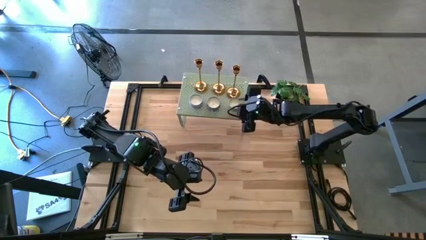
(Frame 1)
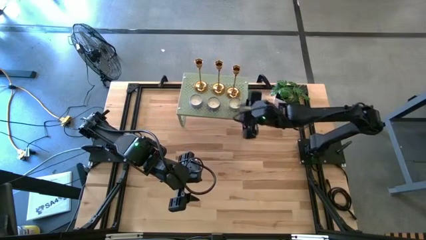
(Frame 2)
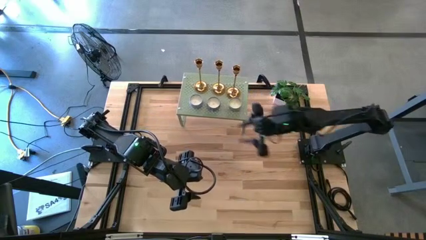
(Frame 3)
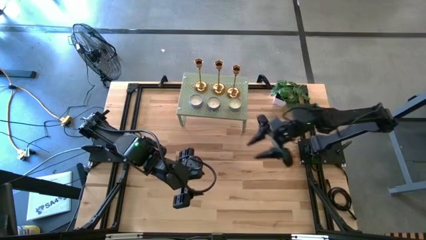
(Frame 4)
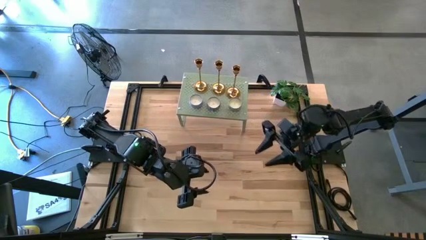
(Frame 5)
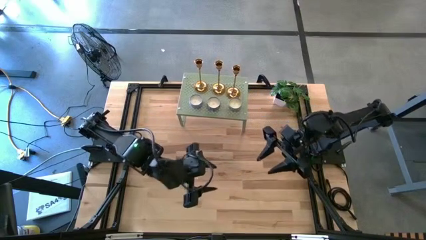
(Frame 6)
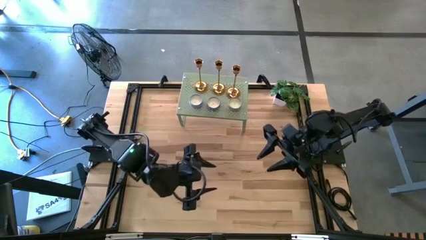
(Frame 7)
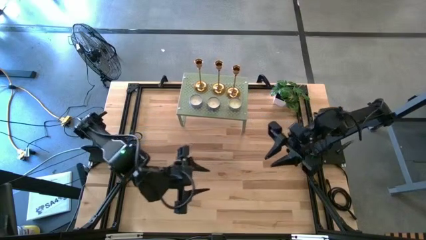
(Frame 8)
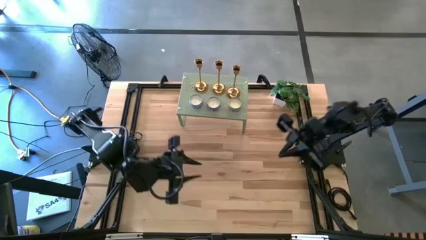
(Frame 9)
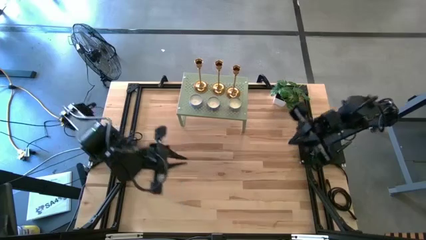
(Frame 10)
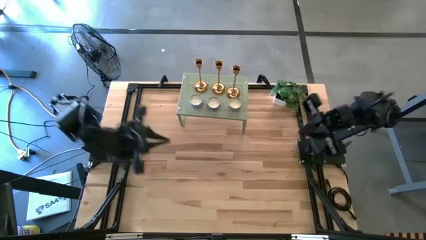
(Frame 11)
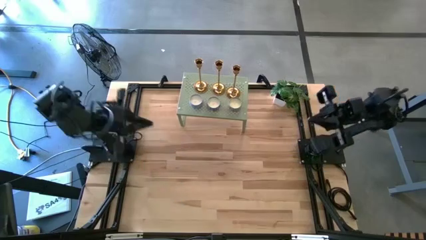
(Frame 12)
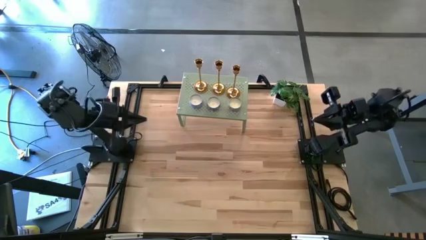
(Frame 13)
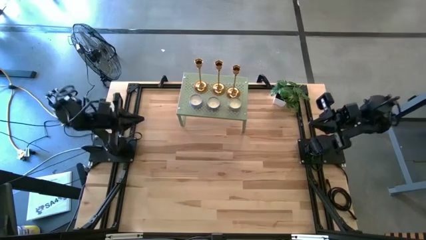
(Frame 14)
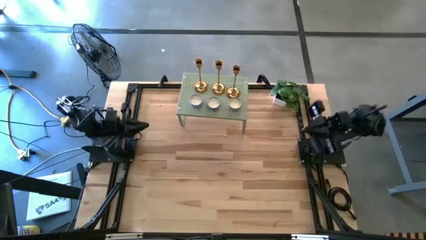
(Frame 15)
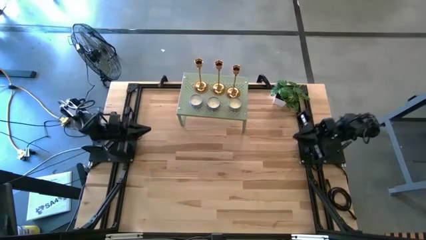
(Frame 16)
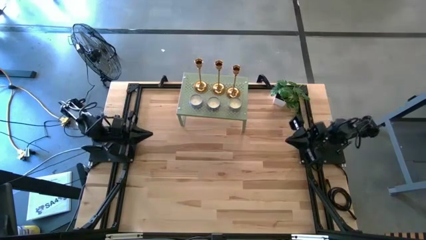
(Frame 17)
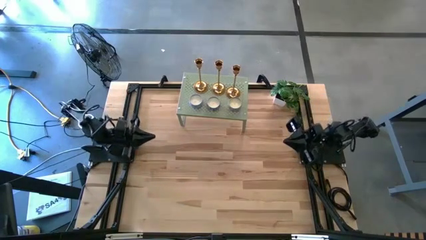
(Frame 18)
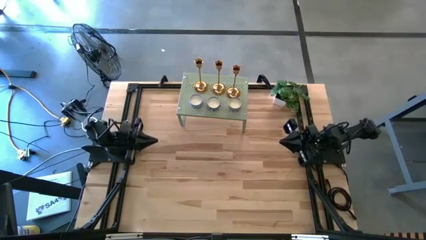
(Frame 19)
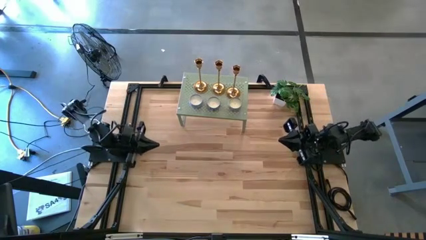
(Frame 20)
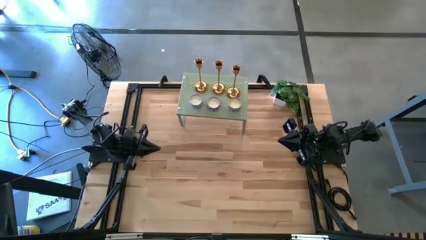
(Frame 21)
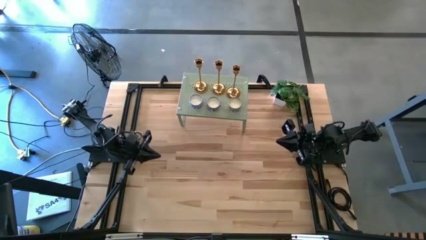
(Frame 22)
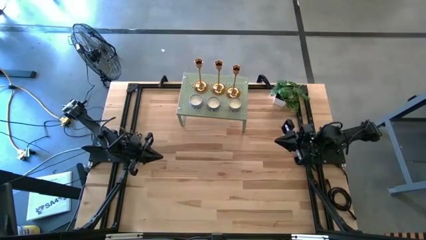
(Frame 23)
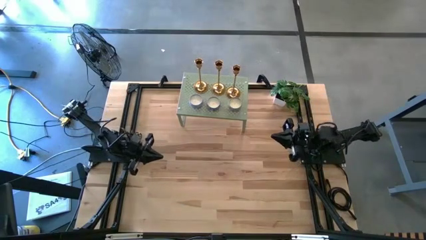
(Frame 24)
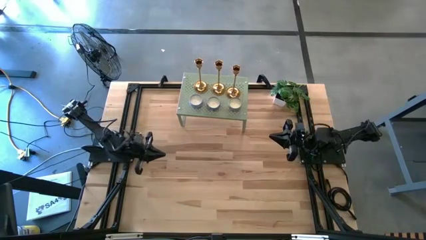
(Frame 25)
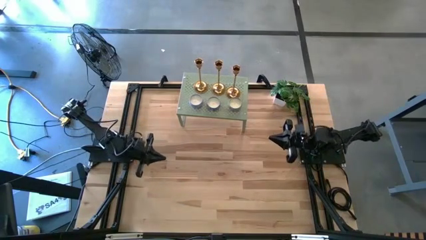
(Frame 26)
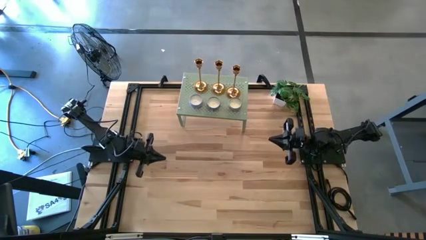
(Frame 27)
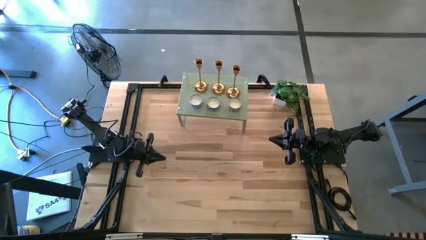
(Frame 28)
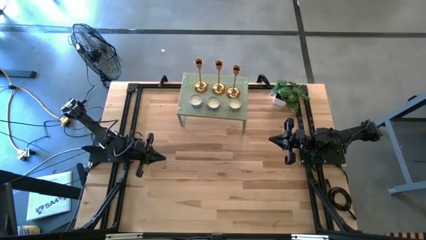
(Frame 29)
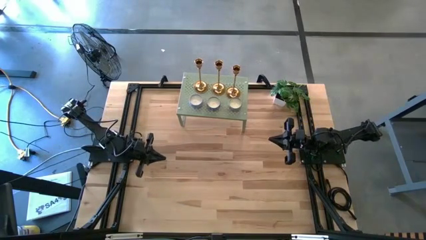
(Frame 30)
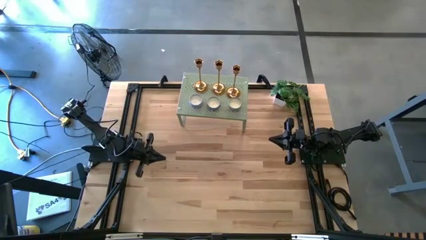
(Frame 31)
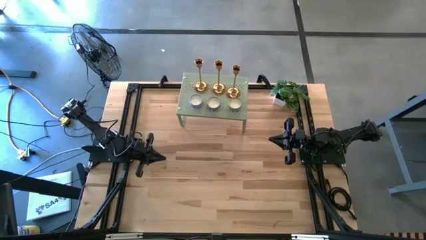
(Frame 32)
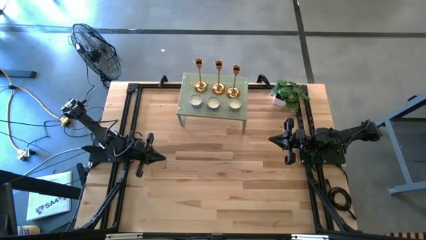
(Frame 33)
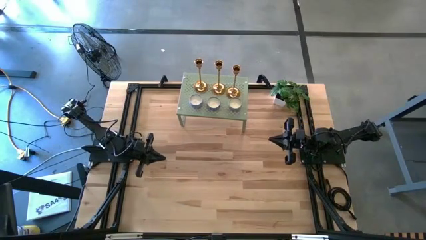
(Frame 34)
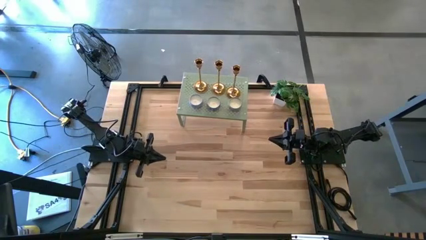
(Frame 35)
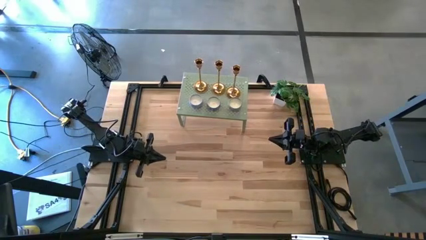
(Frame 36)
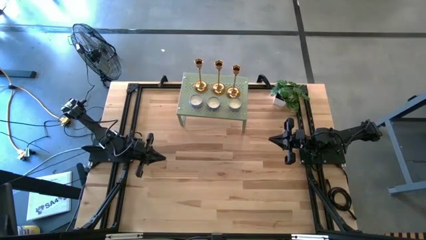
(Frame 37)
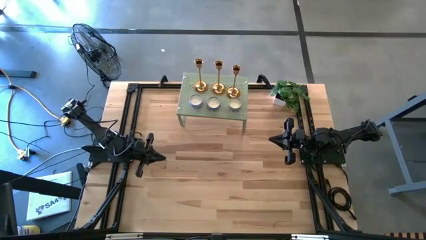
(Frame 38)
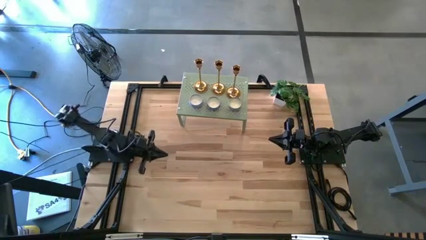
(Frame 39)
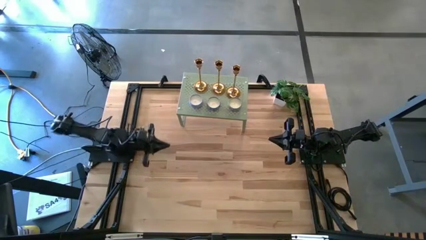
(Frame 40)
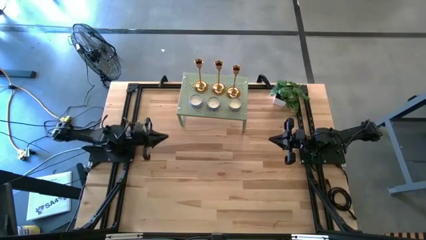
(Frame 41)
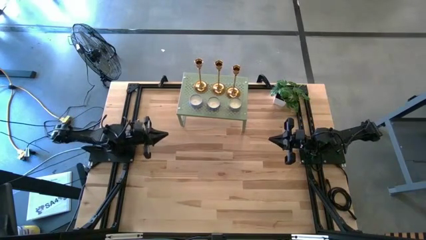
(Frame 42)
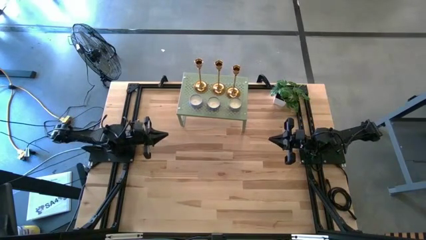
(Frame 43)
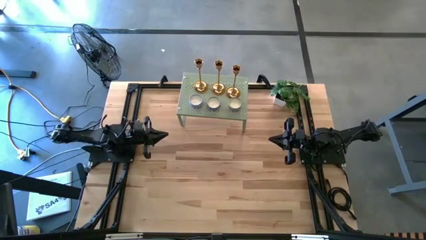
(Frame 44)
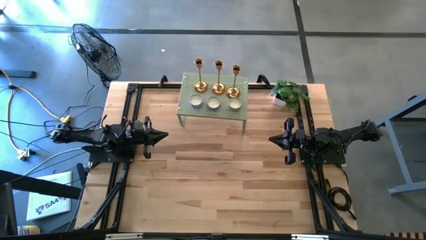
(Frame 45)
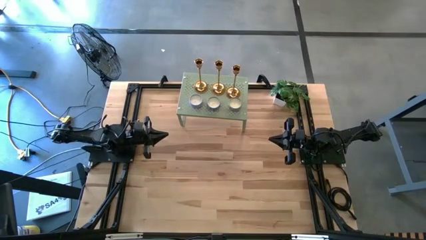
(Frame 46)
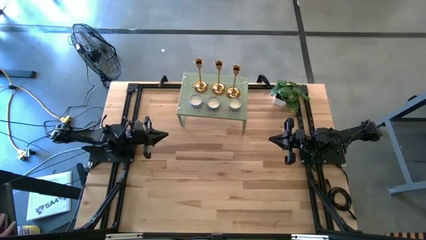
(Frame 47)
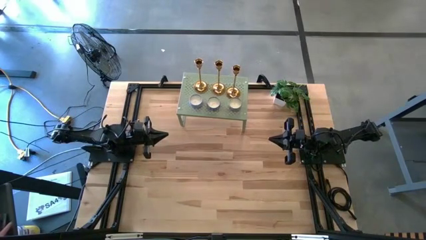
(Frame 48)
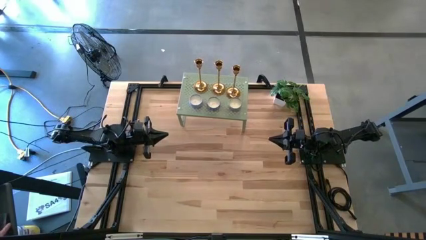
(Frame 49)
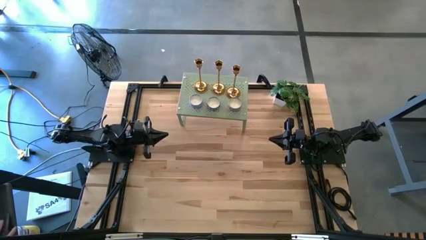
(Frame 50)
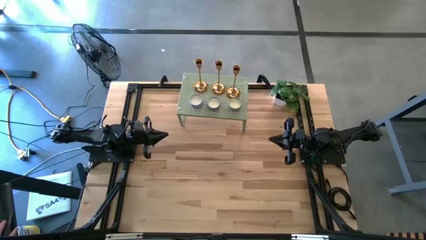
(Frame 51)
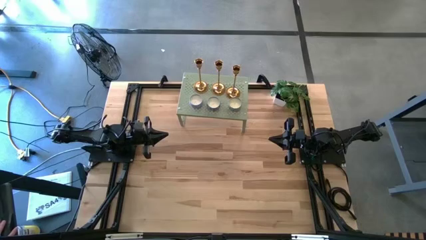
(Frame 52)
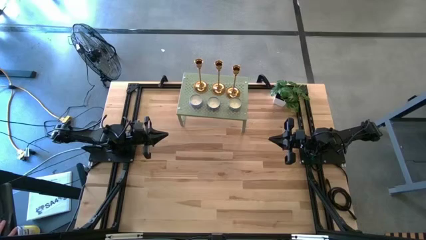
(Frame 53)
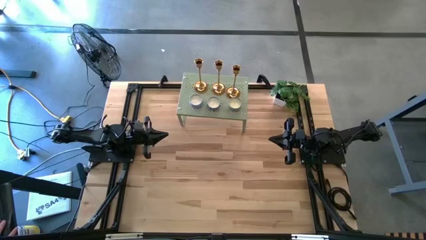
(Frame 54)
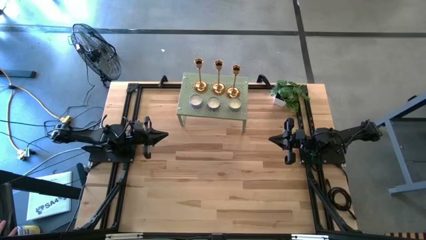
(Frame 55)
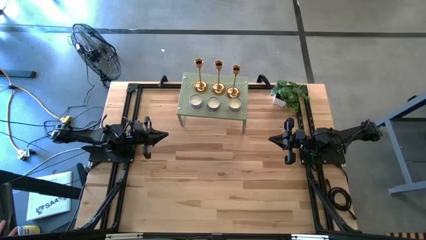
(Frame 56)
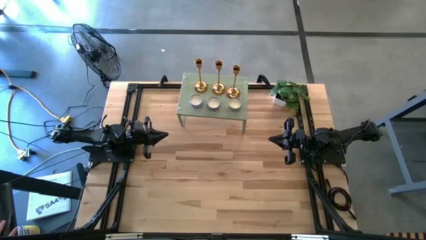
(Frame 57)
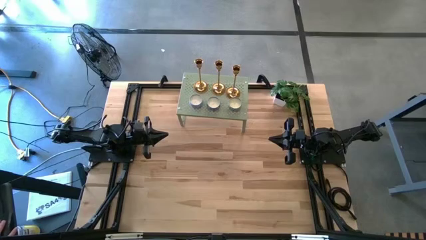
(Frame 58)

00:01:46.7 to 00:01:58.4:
Task: Pick & Place candle stick holders
Return to Home Position
